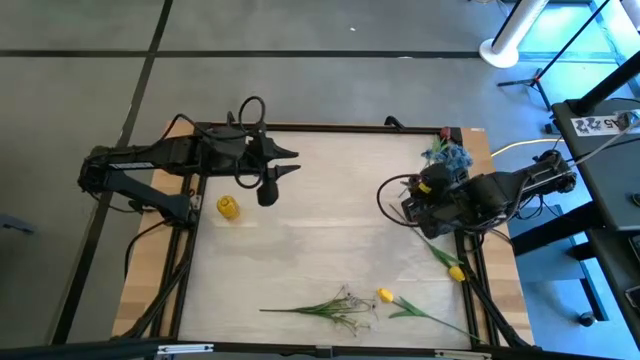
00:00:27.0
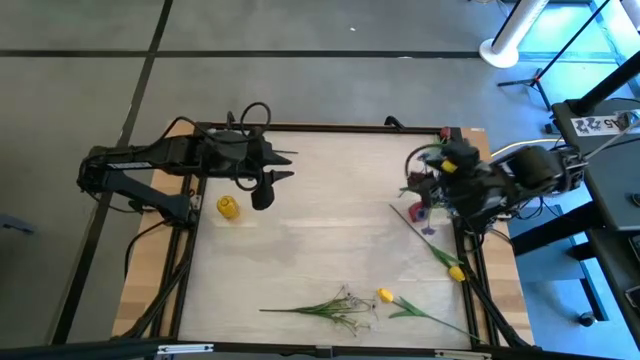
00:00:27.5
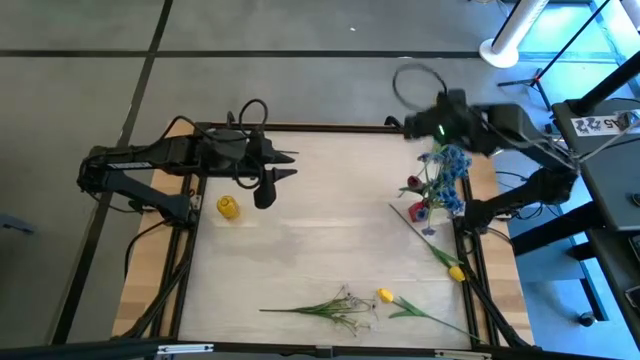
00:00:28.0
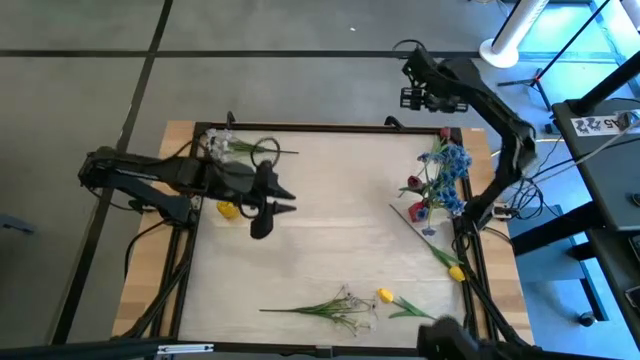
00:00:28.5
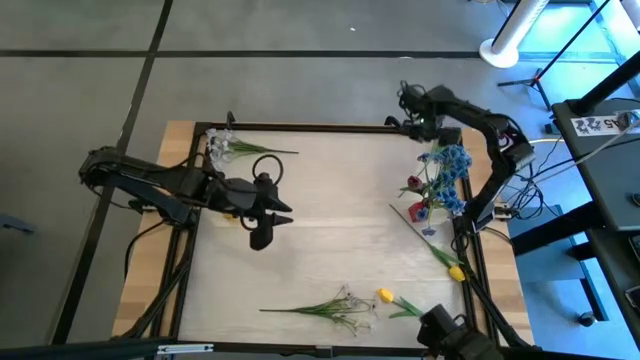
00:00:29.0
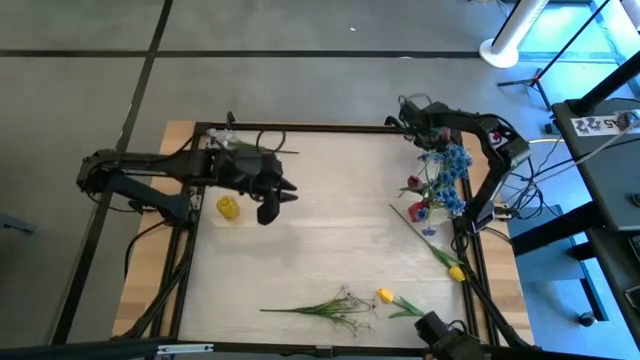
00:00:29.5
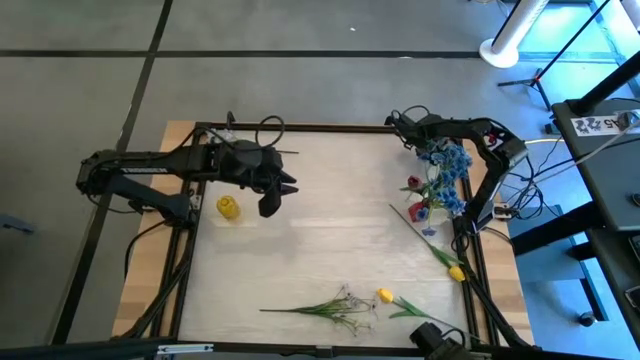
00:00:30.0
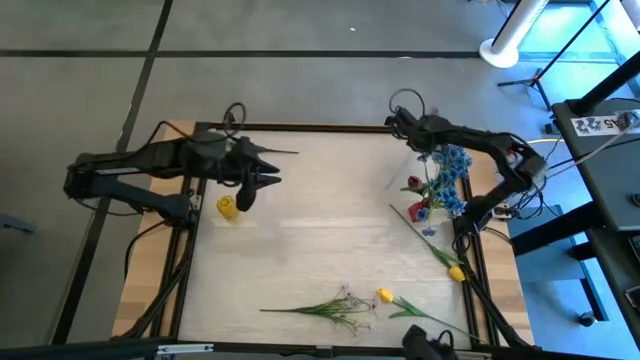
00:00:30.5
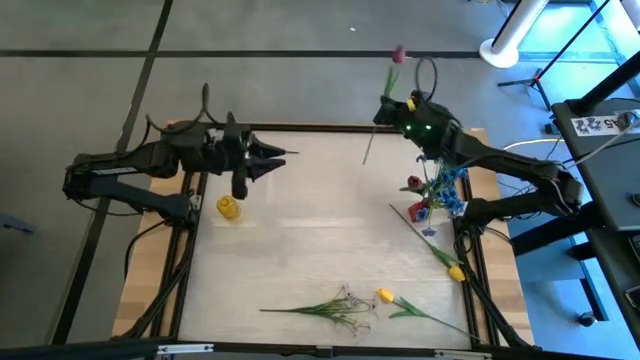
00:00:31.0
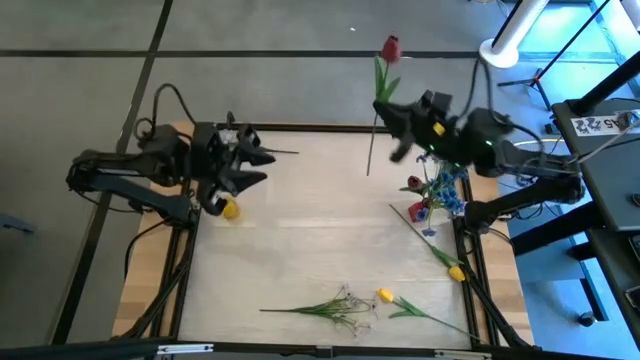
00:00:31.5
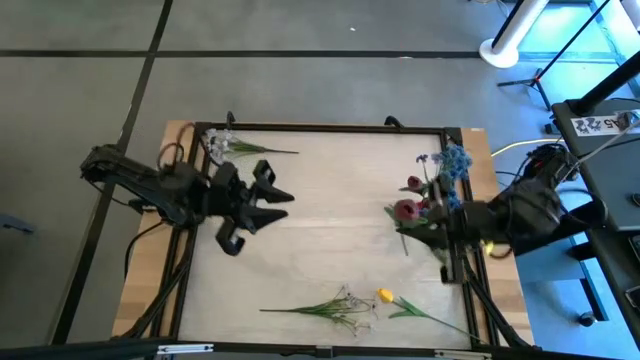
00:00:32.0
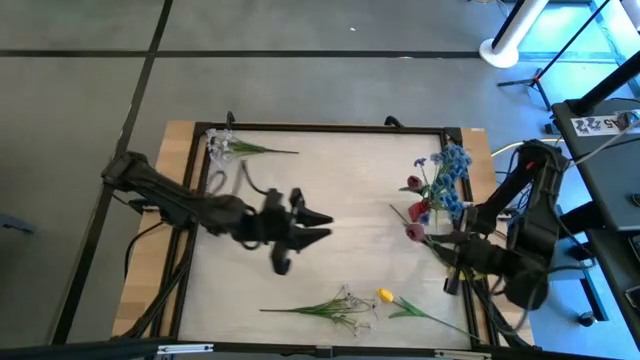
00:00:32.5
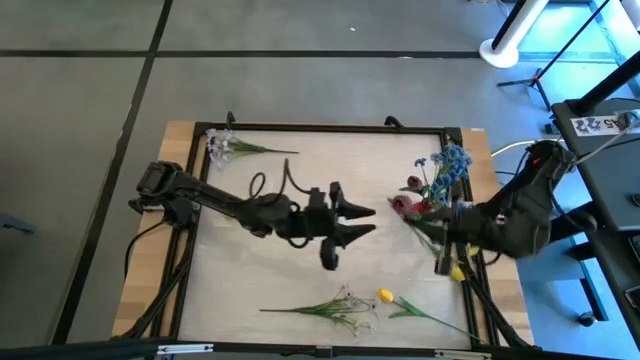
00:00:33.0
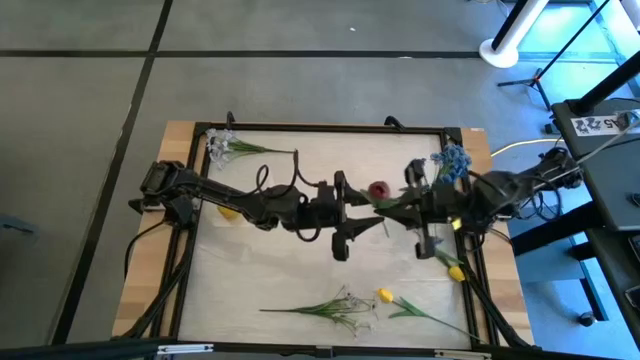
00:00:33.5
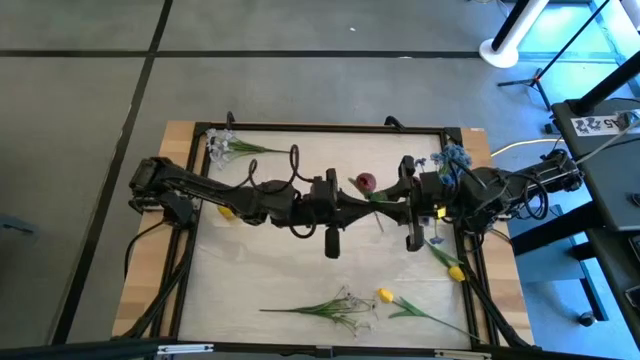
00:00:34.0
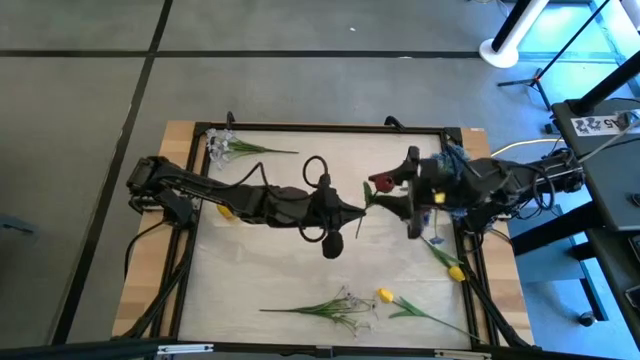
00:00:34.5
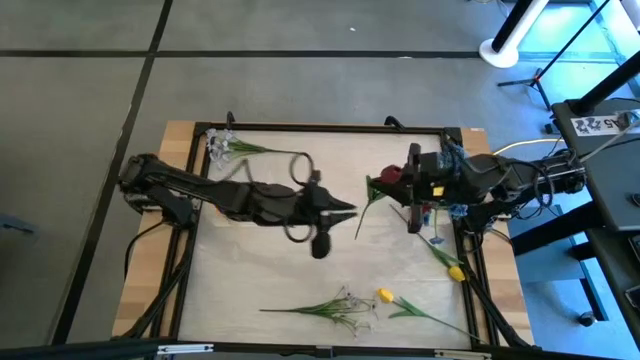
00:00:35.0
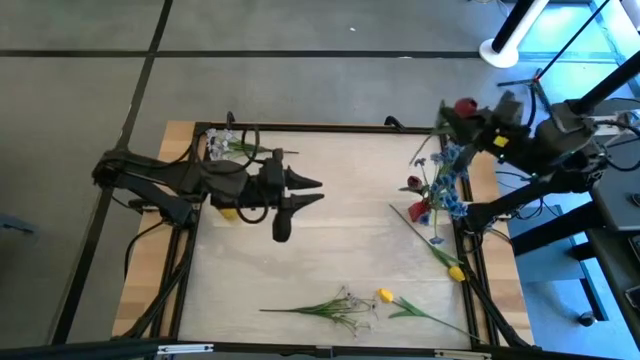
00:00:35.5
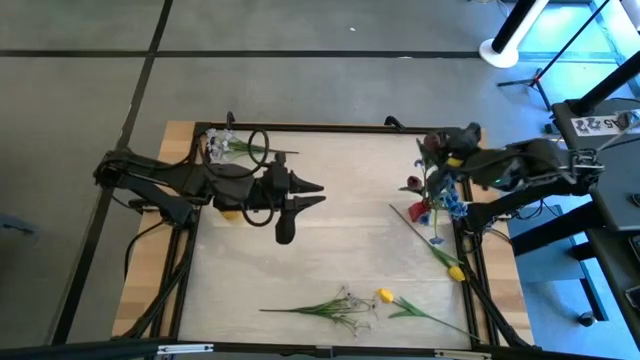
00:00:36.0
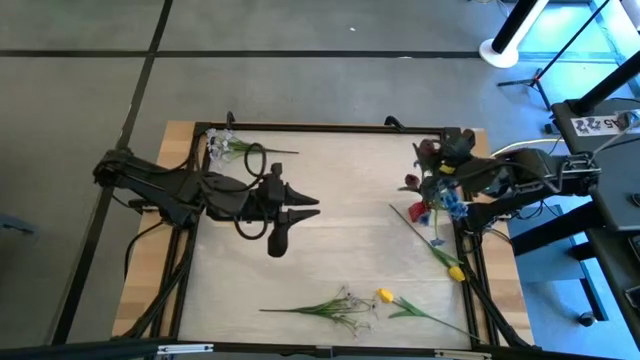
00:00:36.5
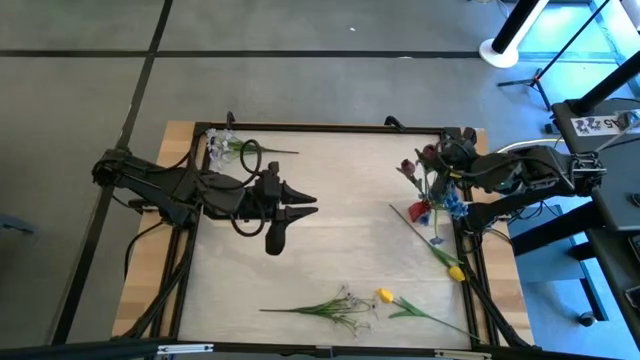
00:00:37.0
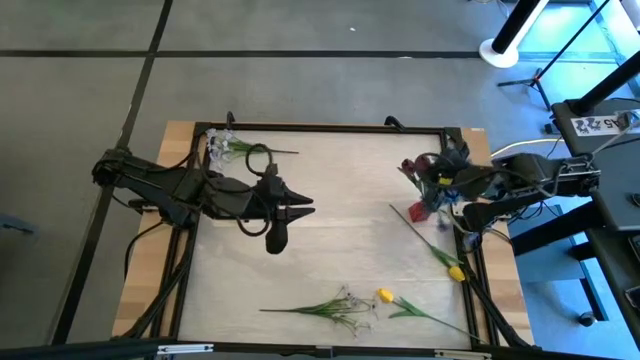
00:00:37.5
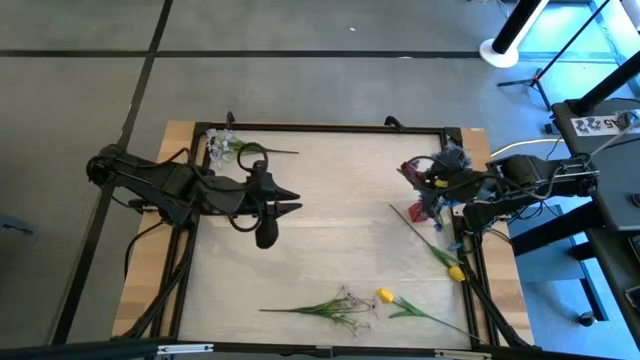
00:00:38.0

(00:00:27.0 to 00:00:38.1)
Task: Sort flowers into vase by color
Put the red flower into the red vase

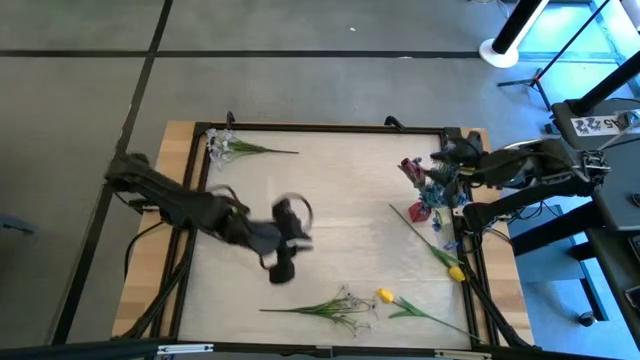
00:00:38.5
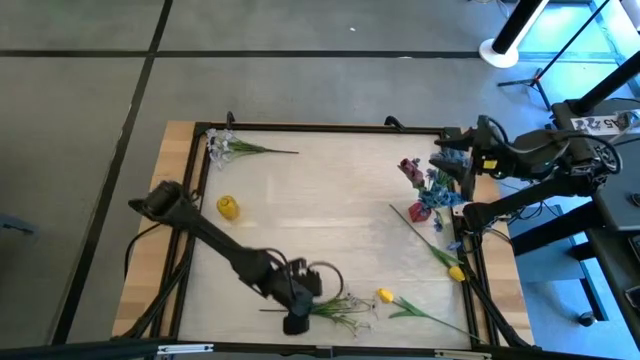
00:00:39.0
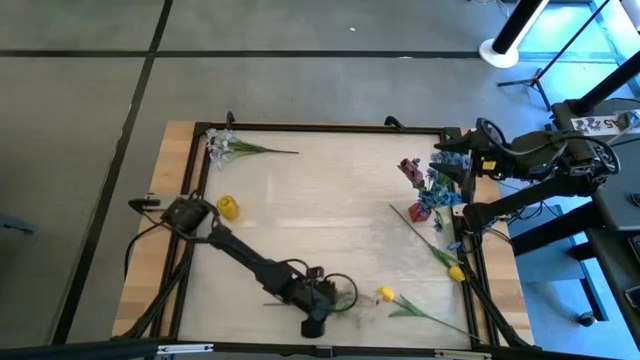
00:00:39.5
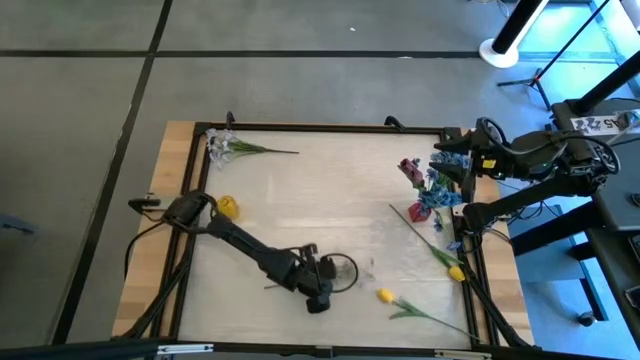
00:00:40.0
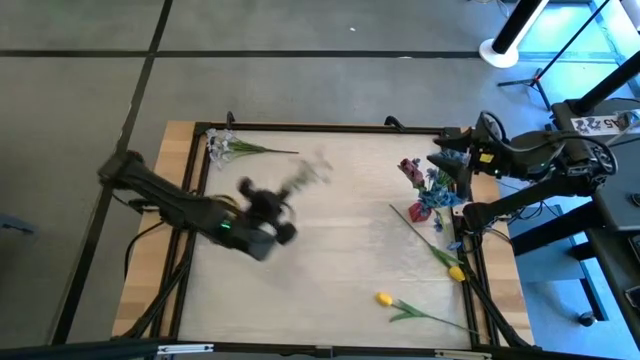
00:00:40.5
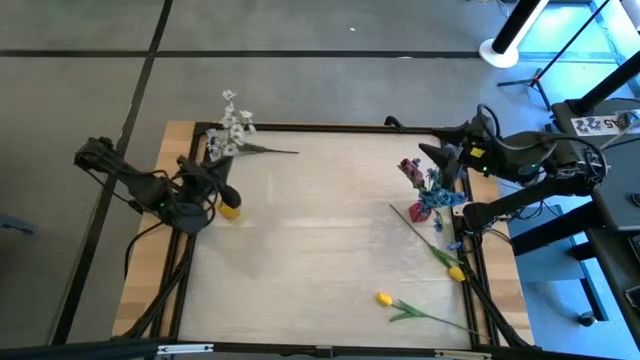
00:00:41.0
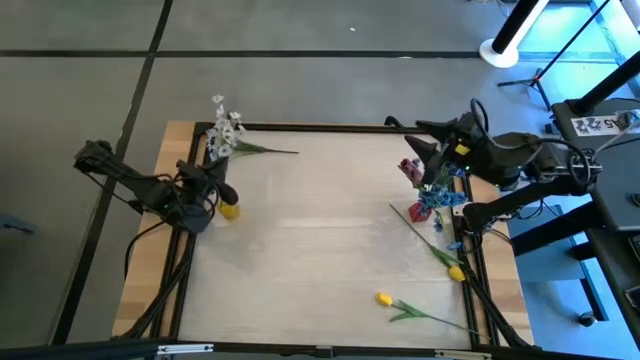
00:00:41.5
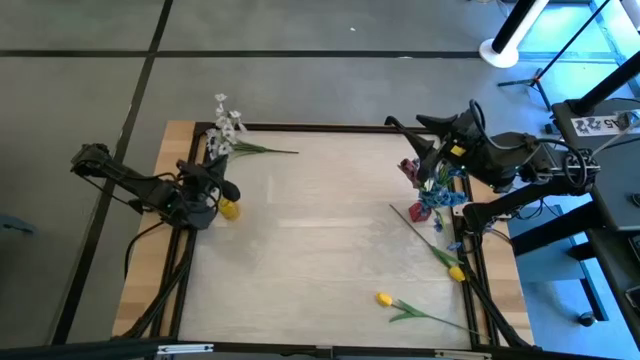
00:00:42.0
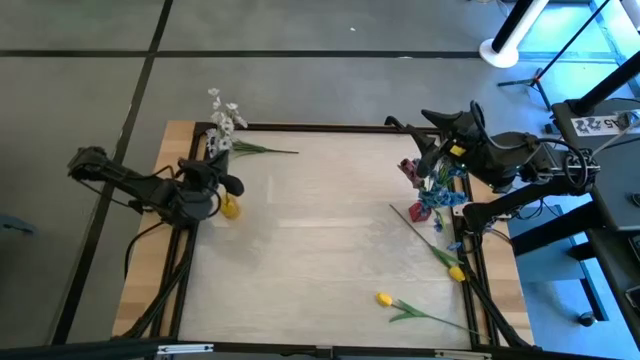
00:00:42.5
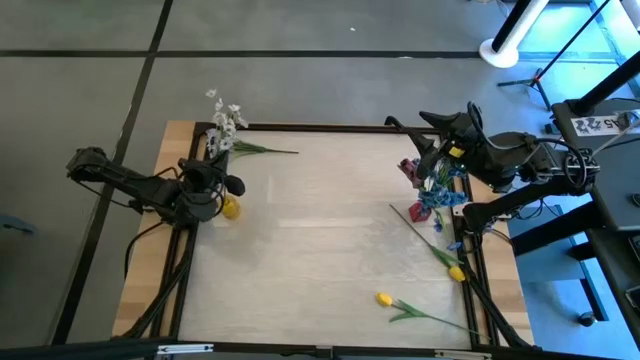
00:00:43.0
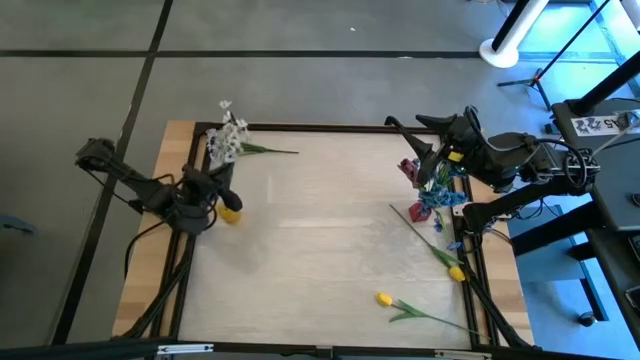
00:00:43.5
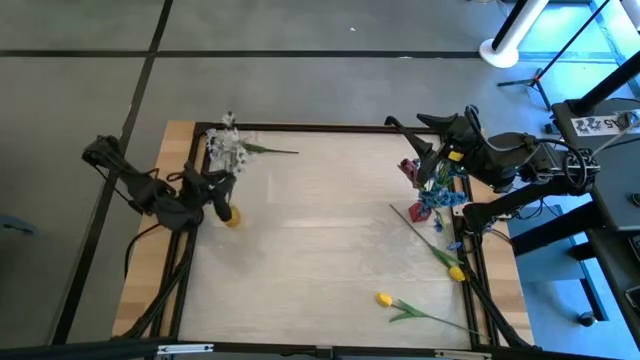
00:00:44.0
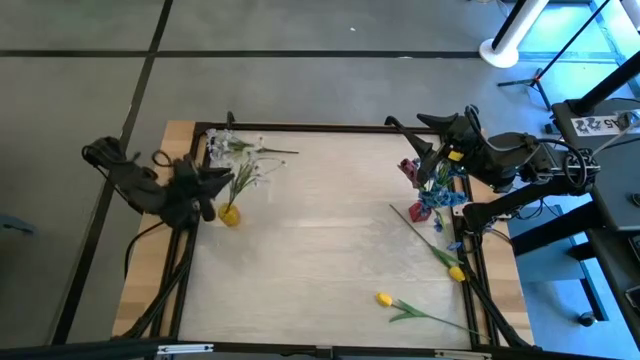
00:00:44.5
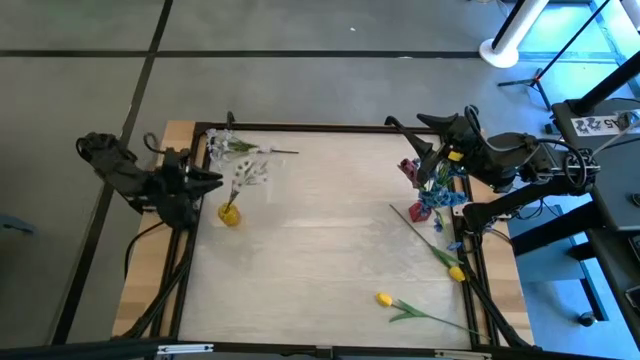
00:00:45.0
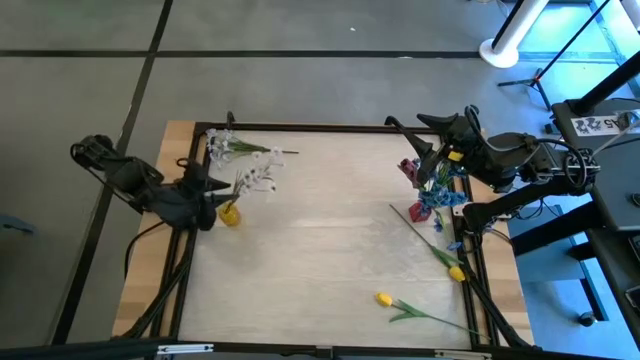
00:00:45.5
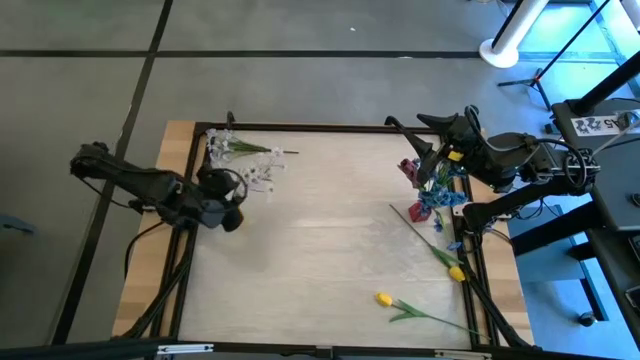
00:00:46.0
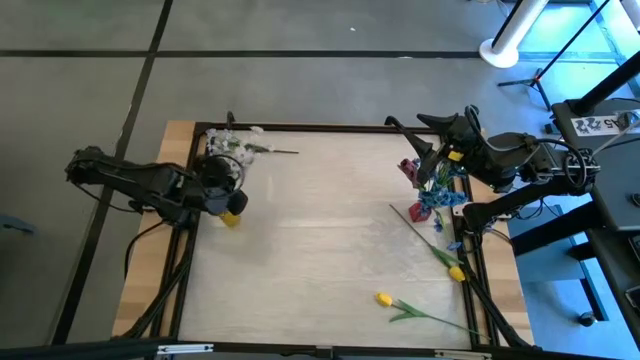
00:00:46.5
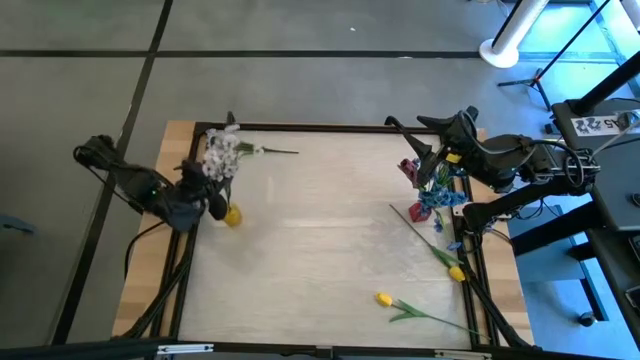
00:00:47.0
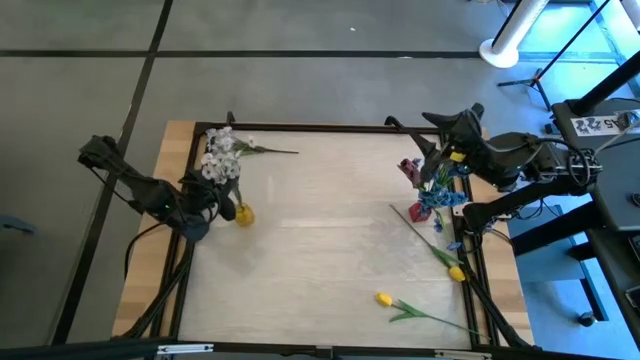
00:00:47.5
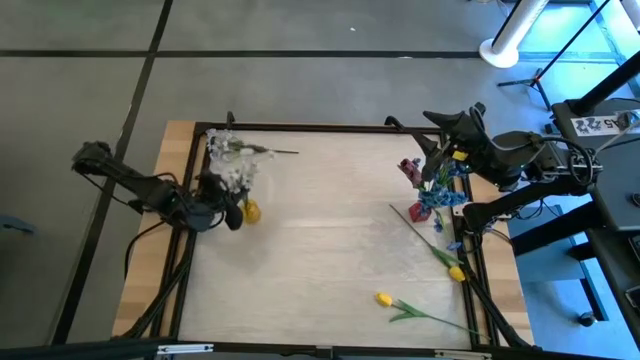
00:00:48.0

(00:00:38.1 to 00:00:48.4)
Put the bottom white flower into the yellow vase
